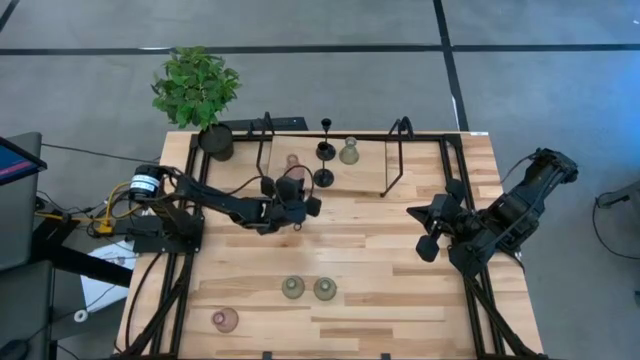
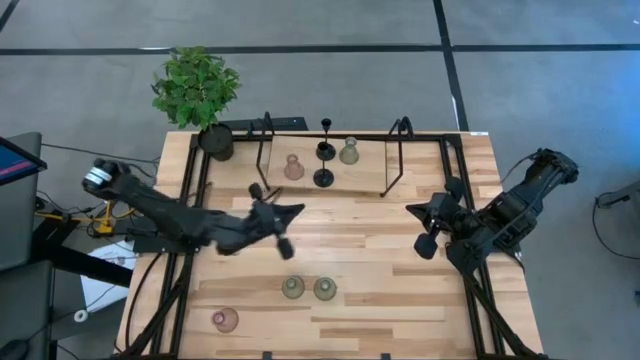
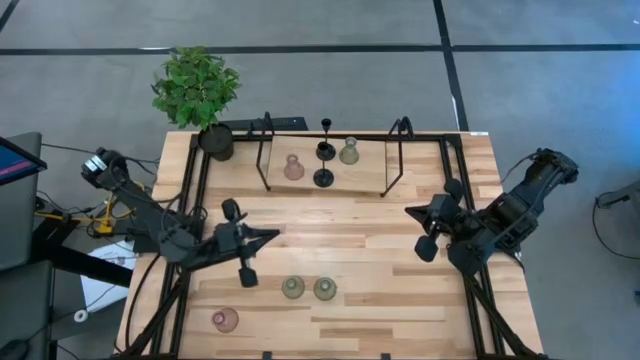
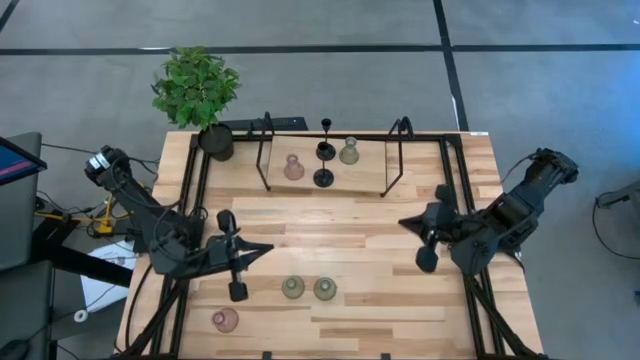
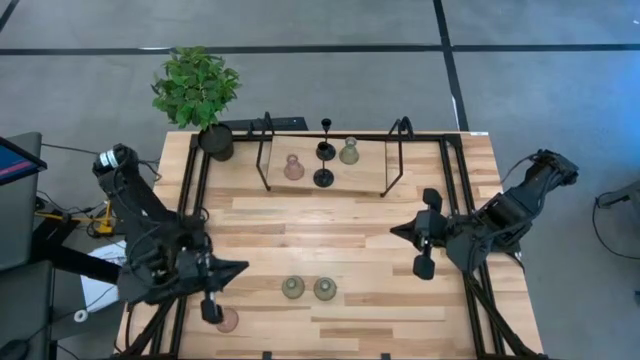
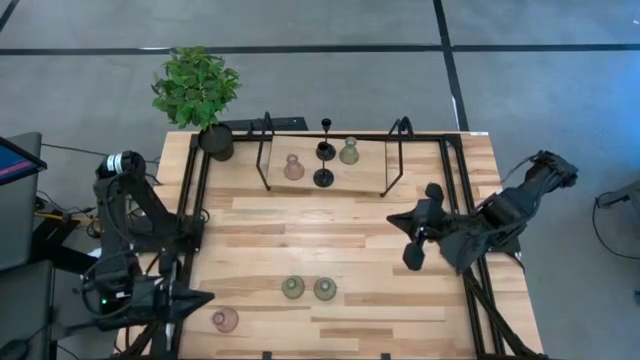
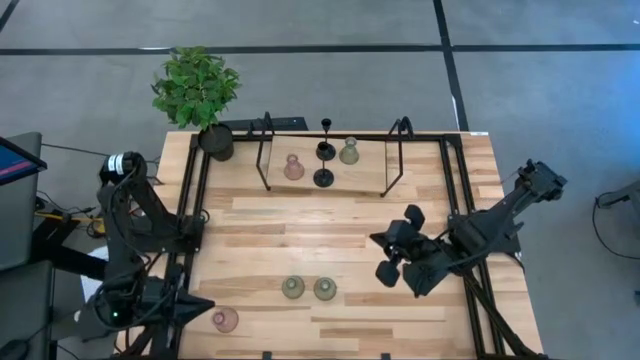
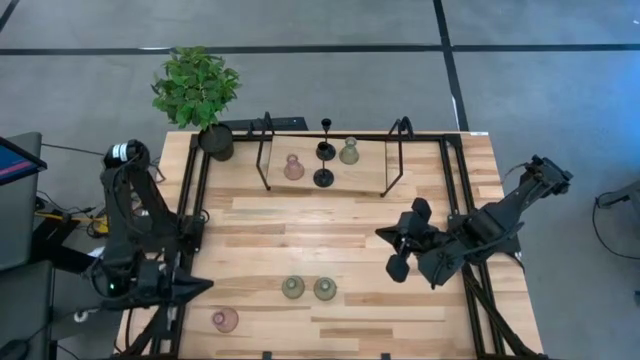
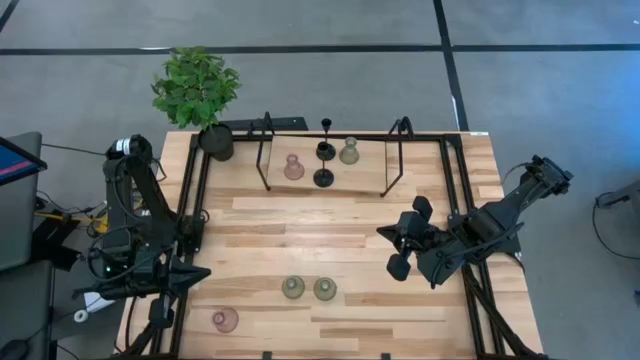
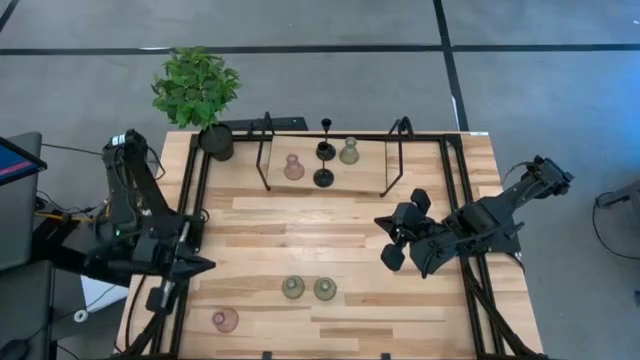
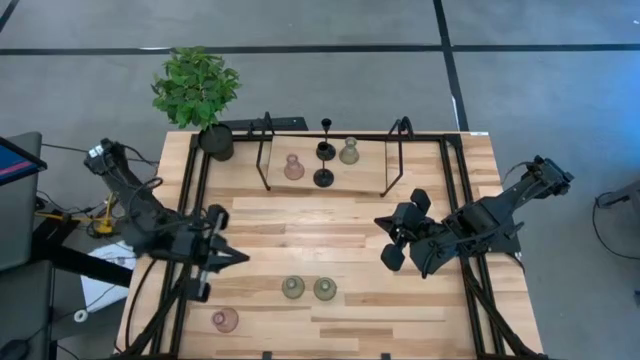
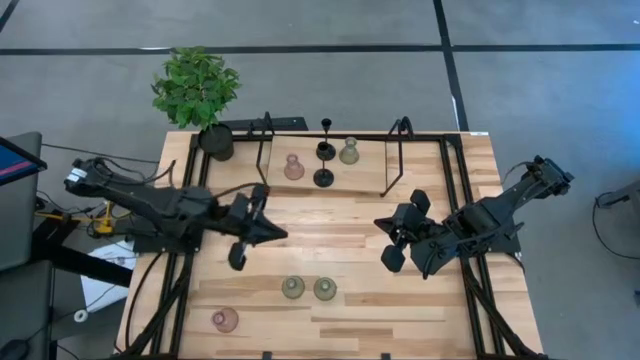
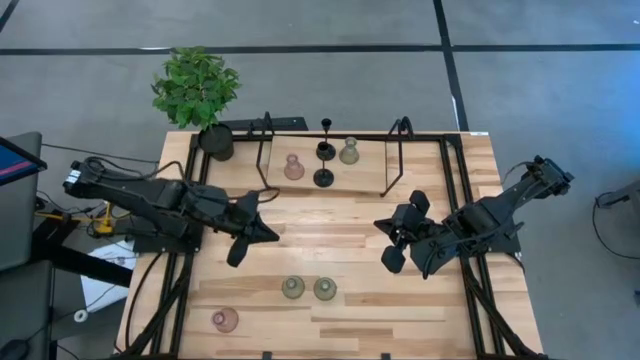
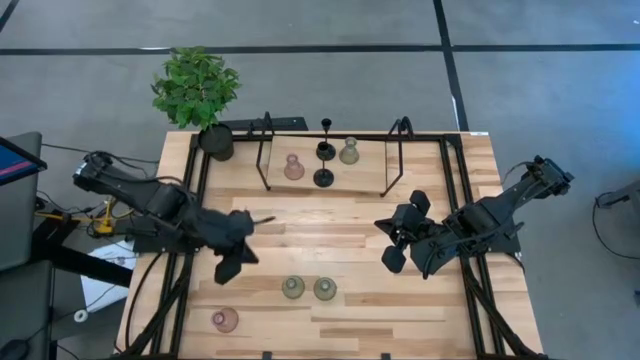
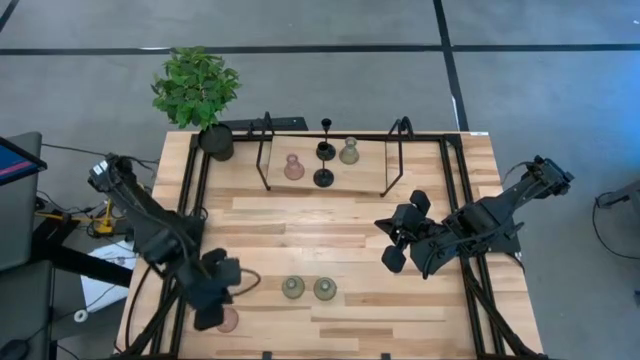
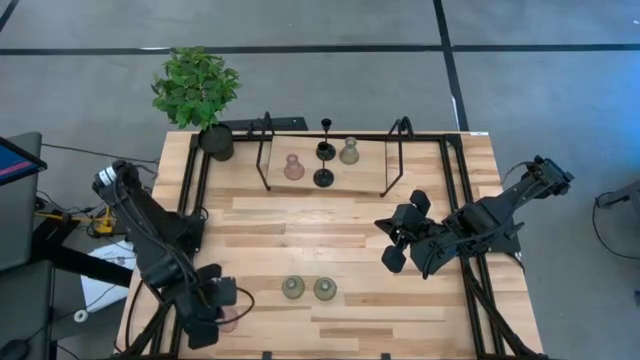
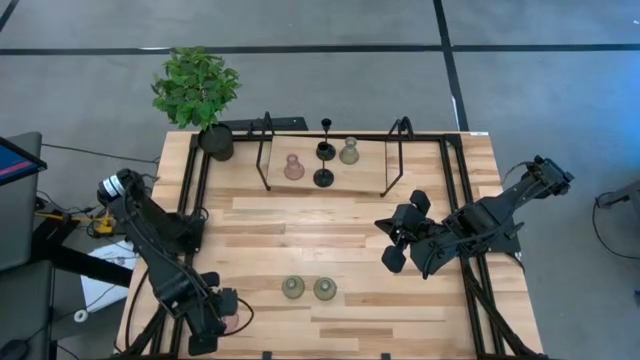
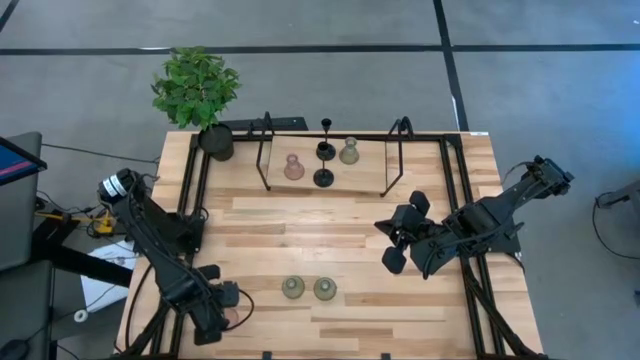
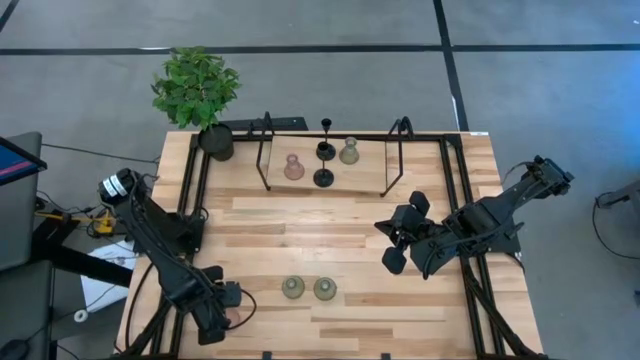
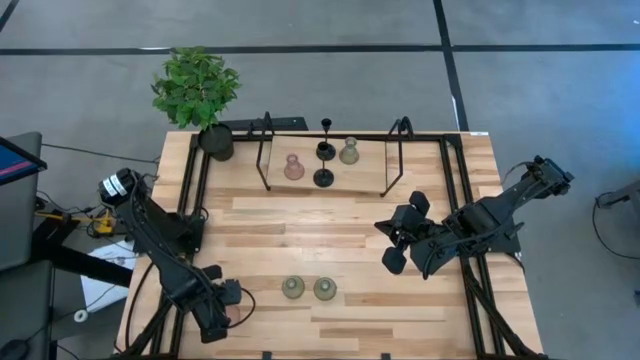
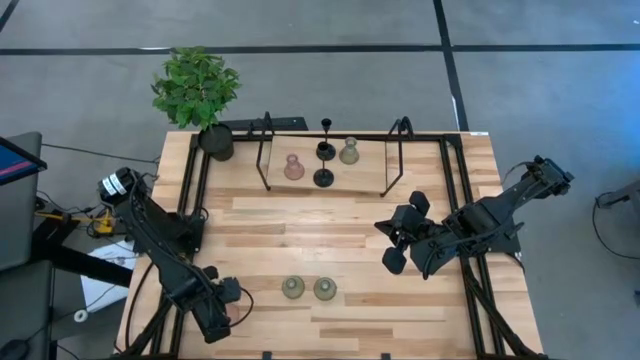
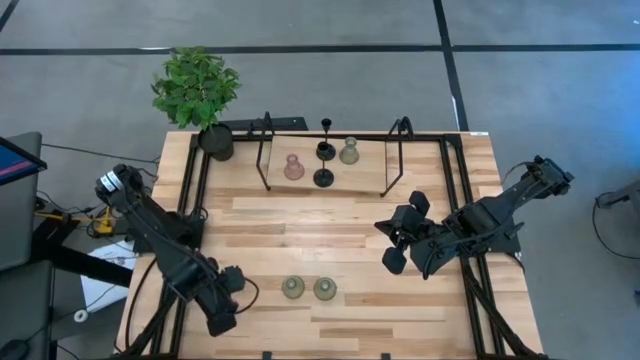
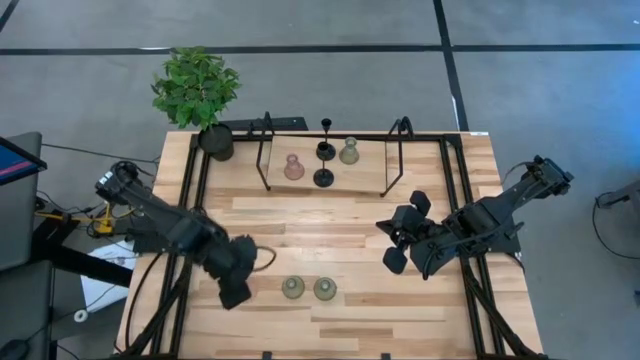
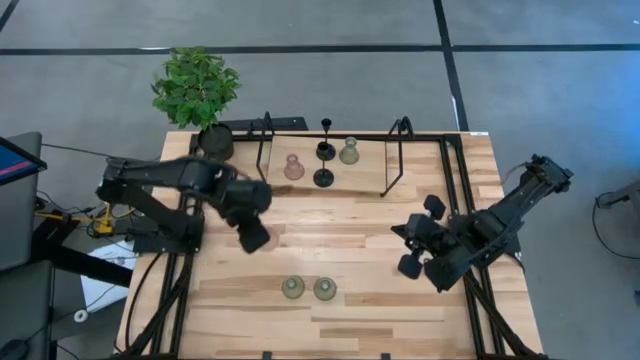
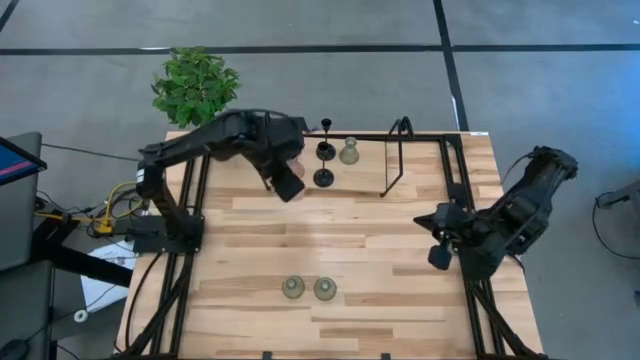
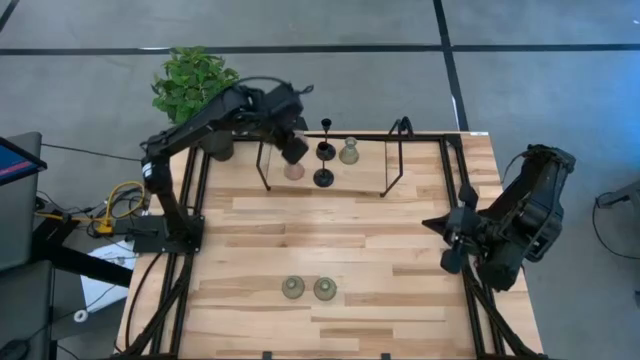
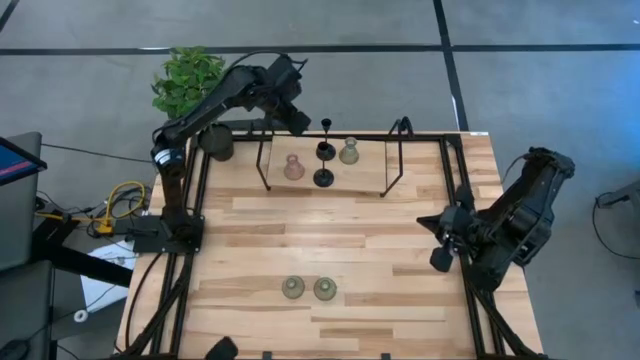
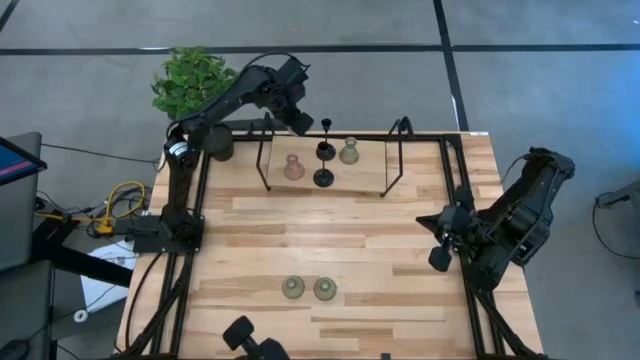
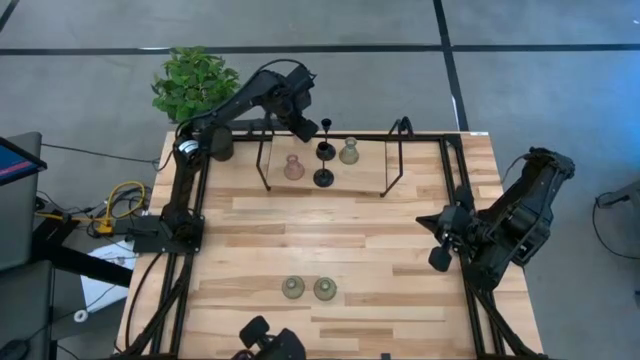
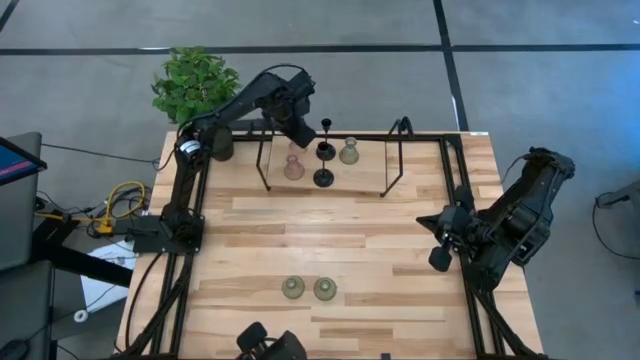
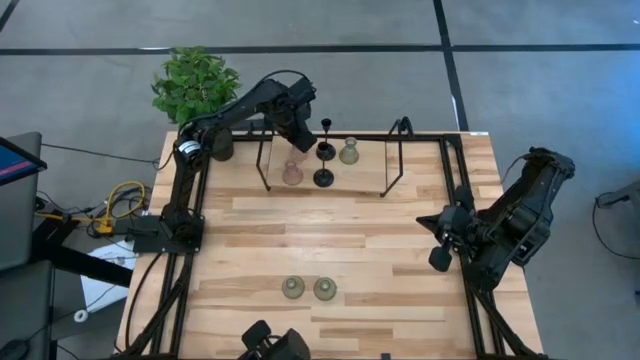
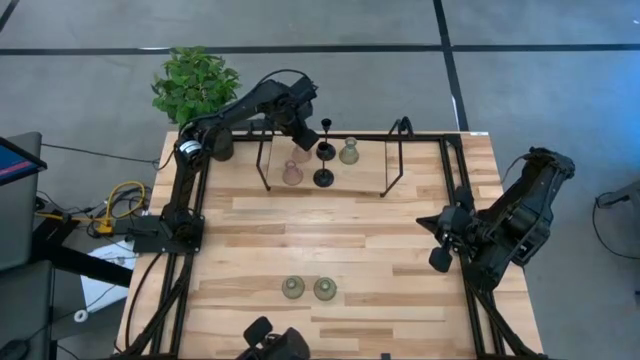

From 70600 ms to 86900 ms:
Task: Pick & Place candle stick holders
Put the pink candle holder on the shelf aligned with the pink candle holder

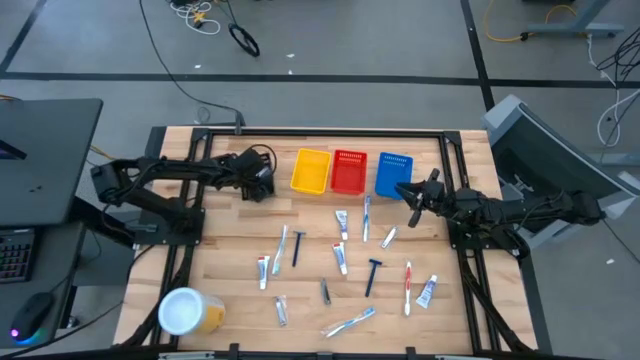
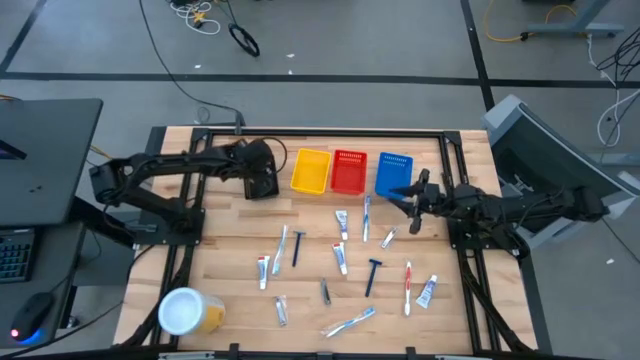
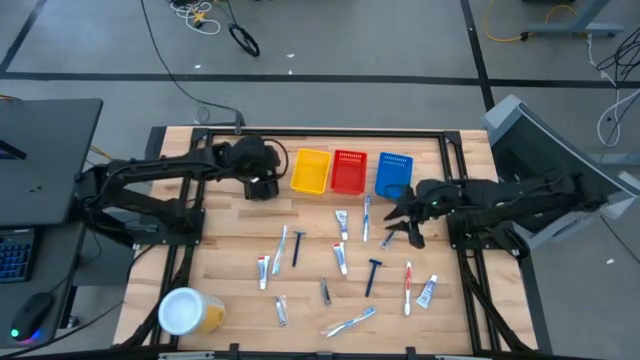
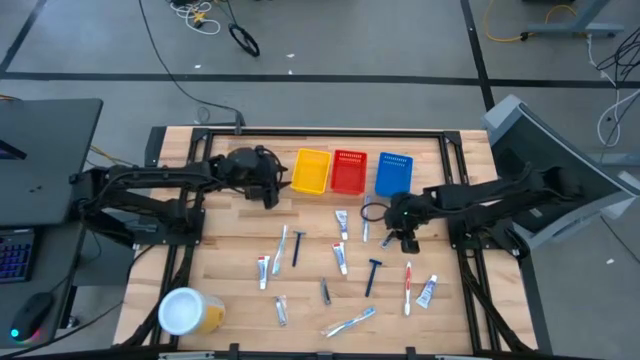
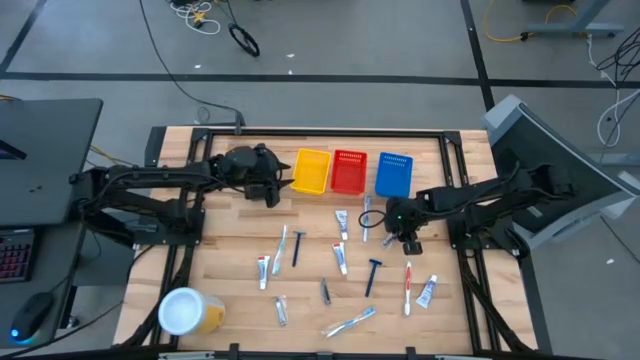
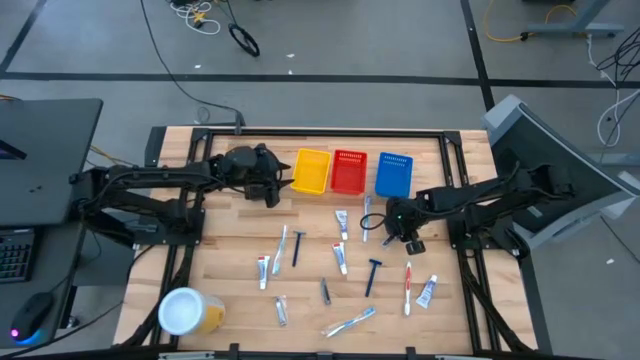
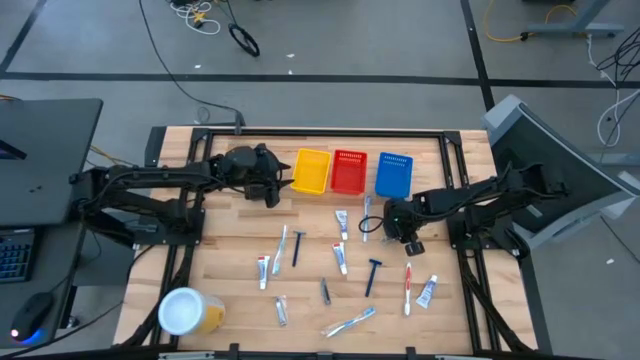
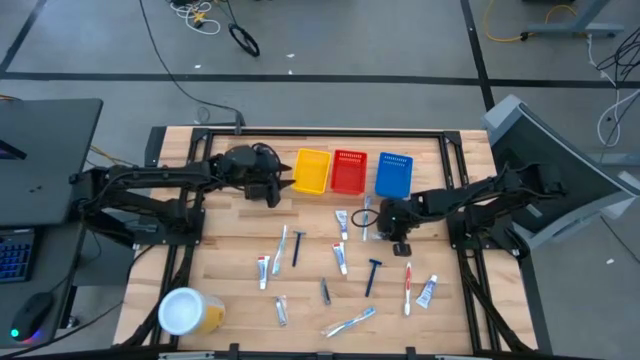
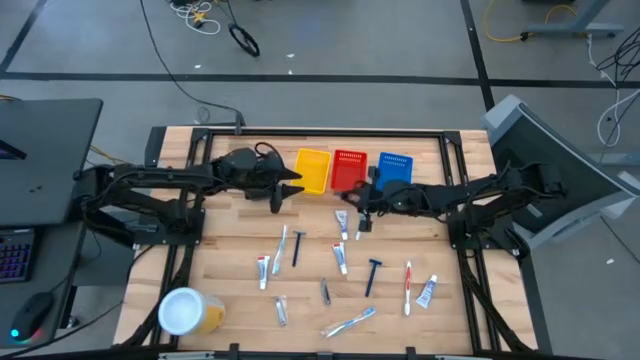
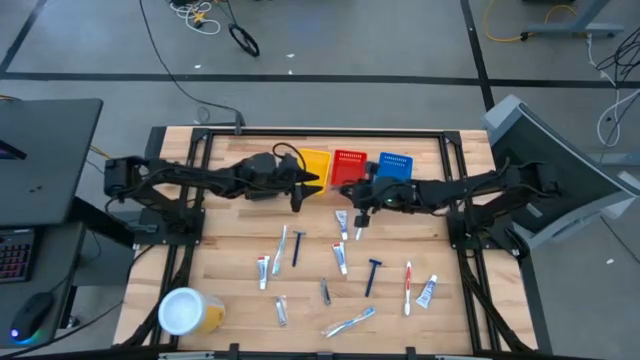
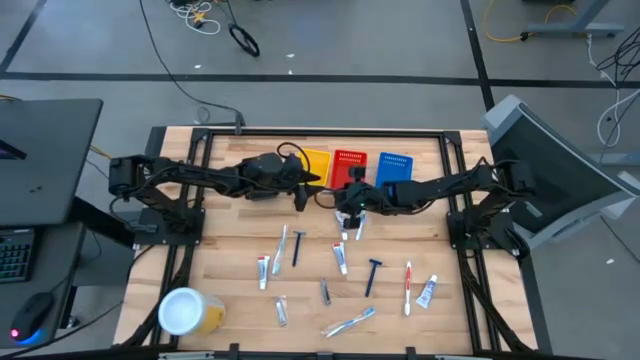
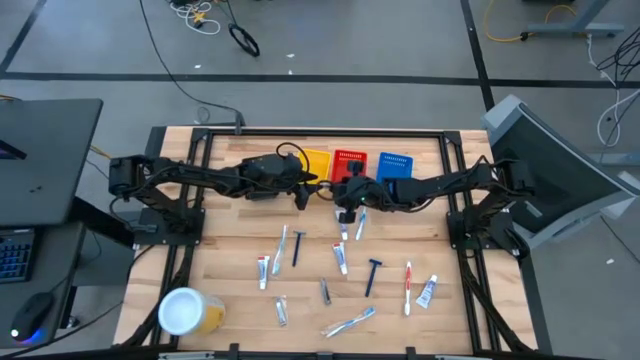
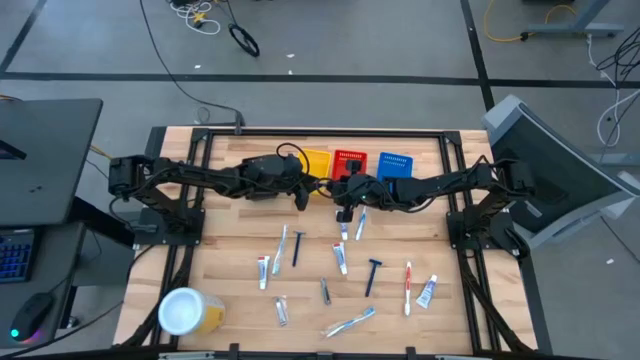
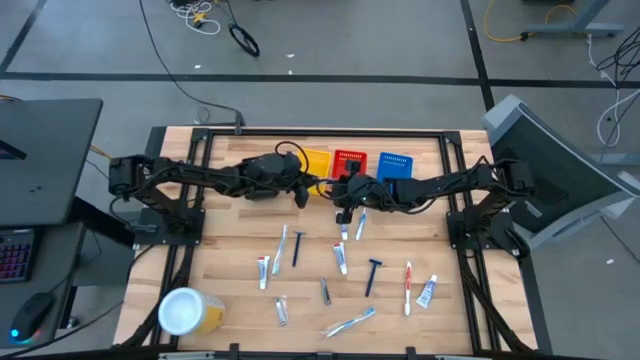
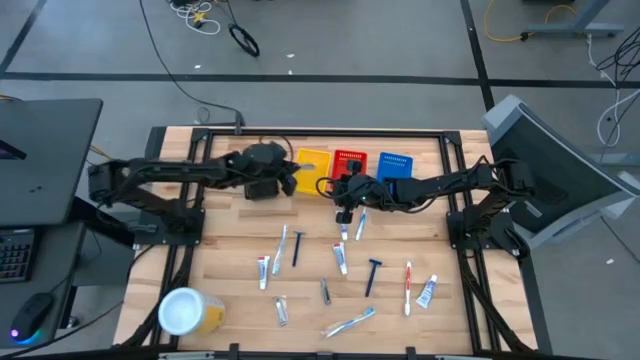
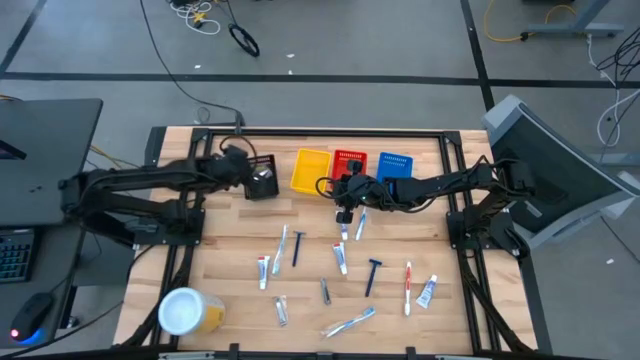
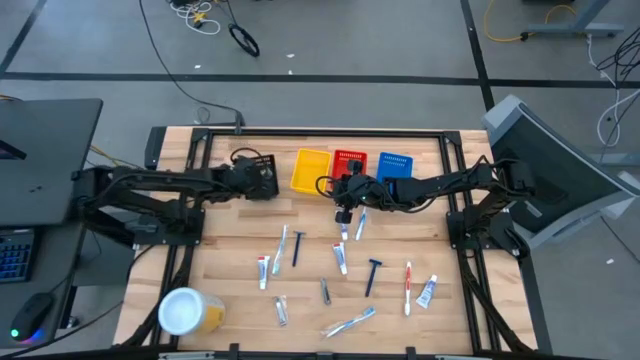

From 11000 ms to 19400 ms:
Task: Pick & Place Travel size toiletries
Put the silver nail cutter into the black bin
